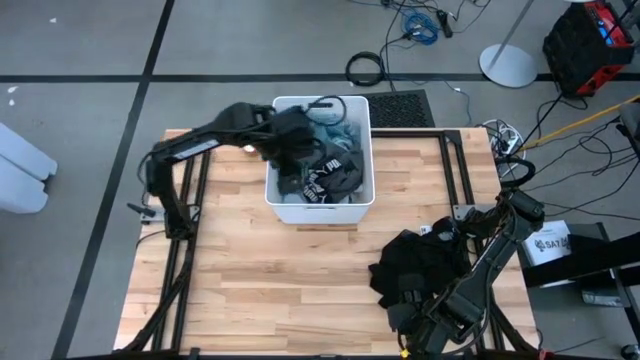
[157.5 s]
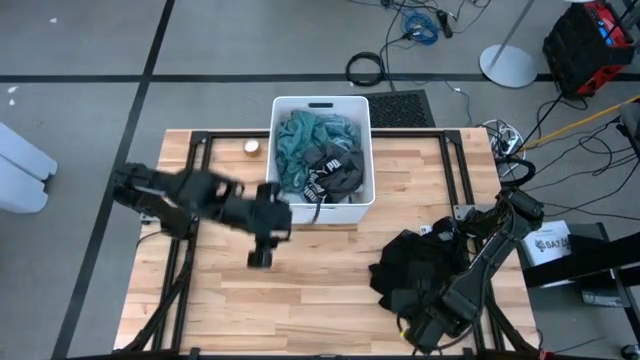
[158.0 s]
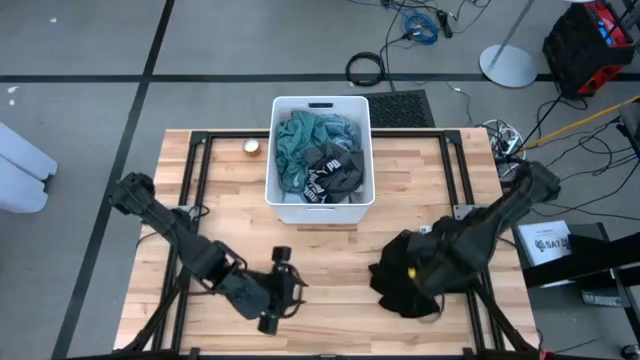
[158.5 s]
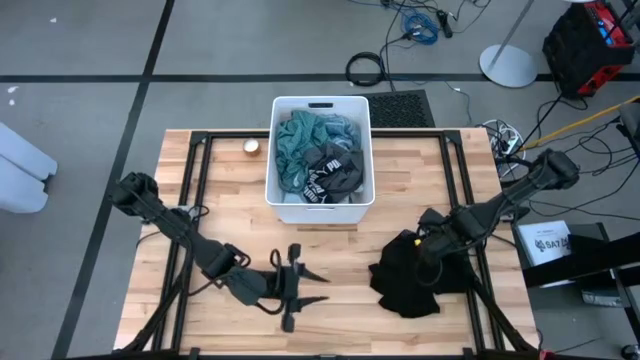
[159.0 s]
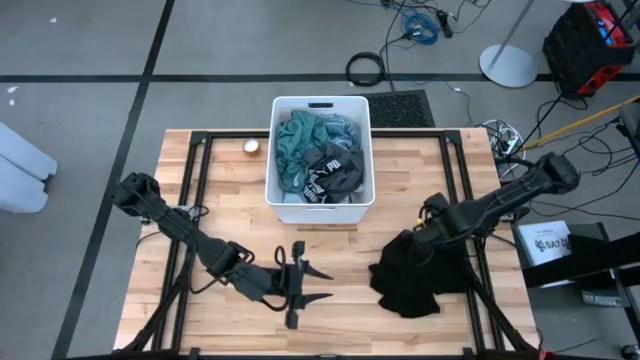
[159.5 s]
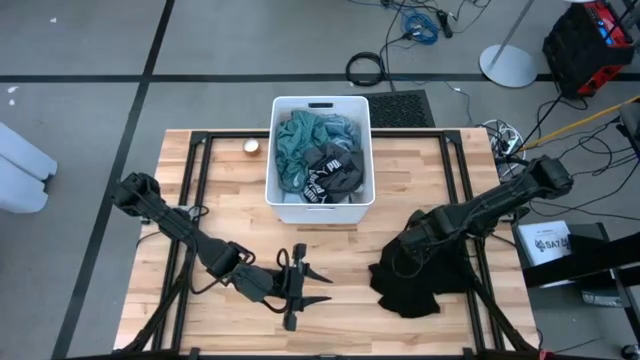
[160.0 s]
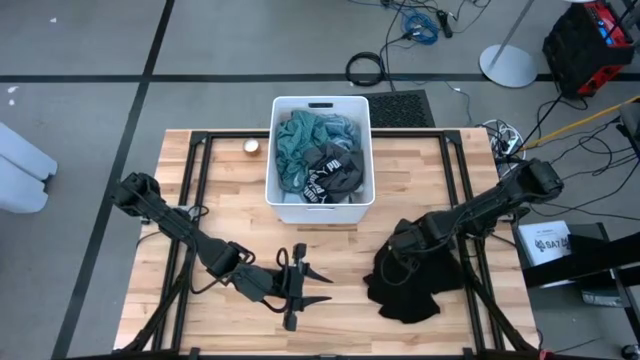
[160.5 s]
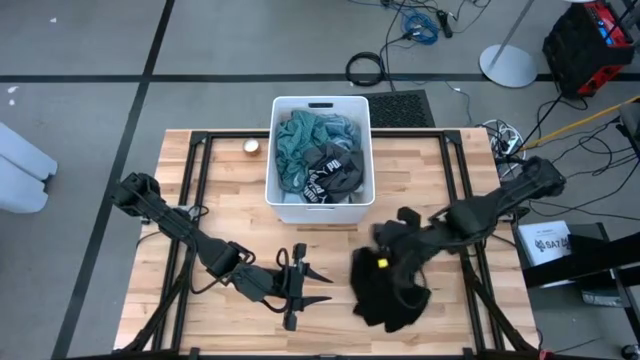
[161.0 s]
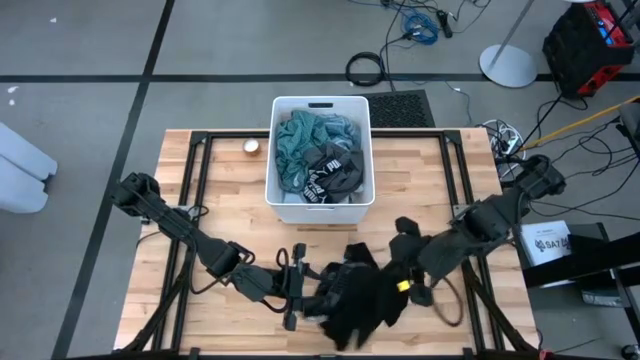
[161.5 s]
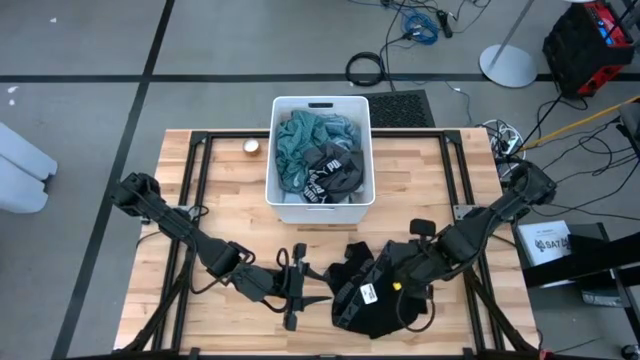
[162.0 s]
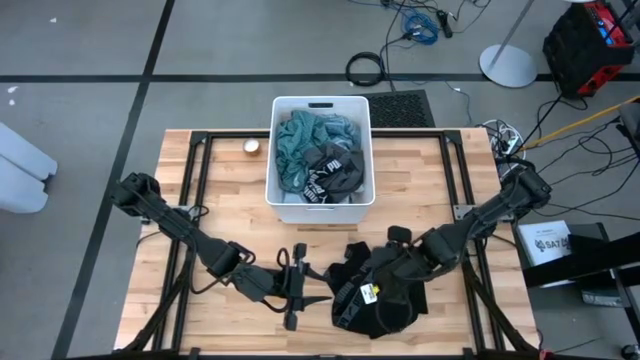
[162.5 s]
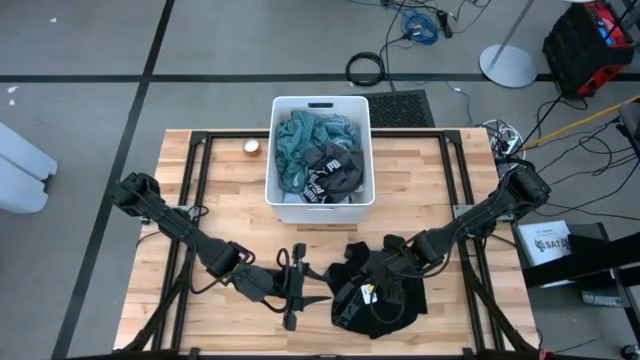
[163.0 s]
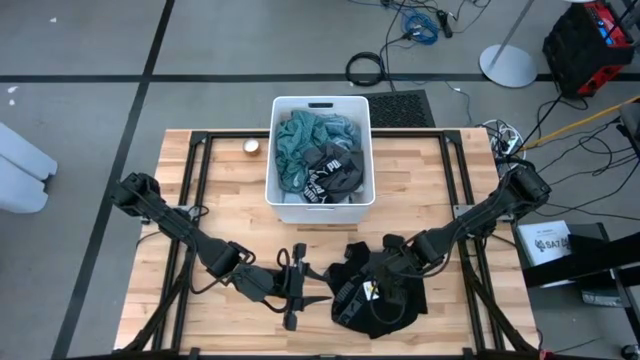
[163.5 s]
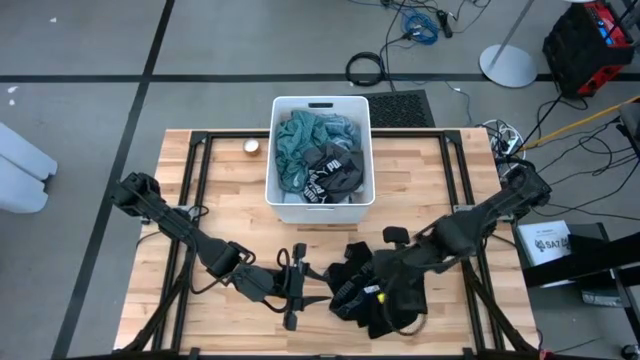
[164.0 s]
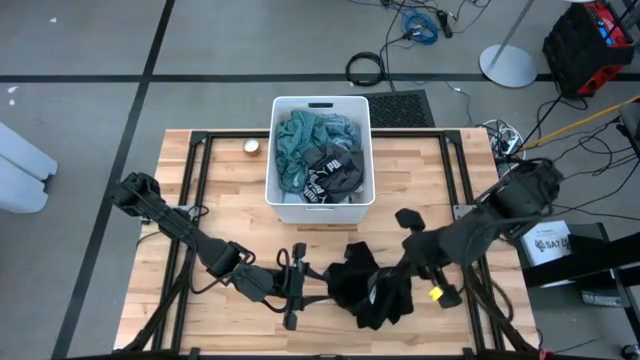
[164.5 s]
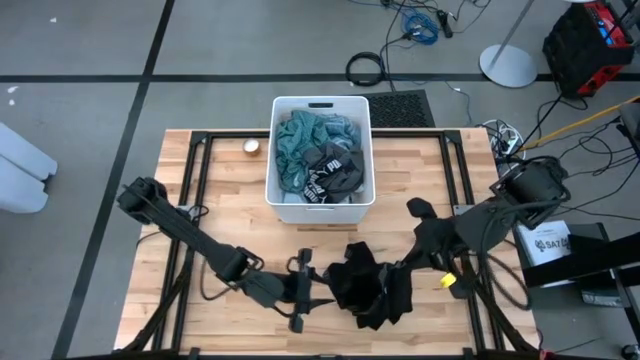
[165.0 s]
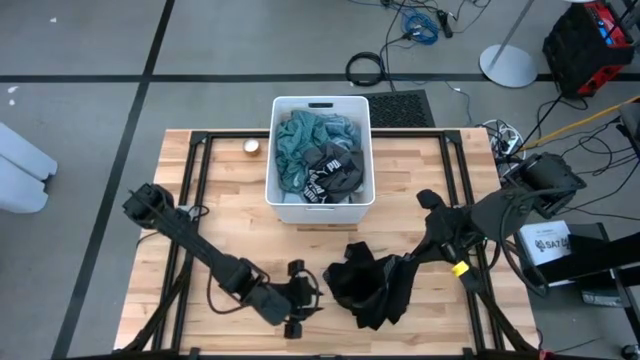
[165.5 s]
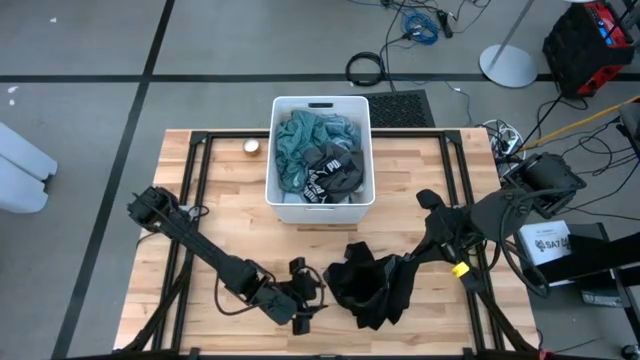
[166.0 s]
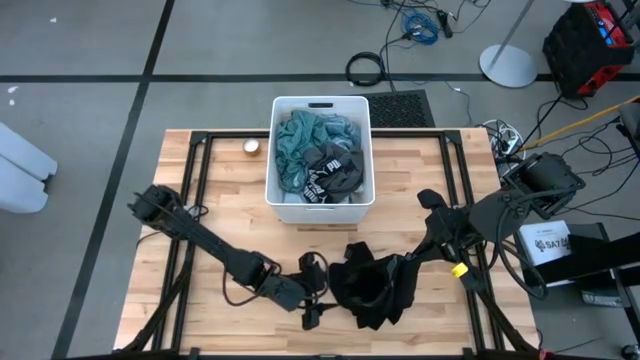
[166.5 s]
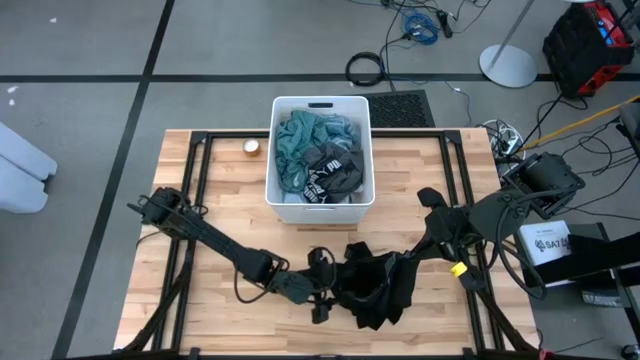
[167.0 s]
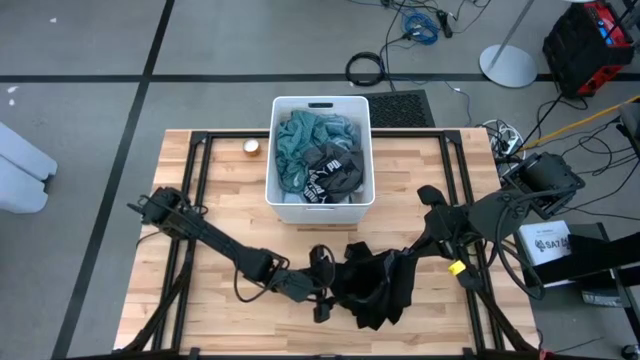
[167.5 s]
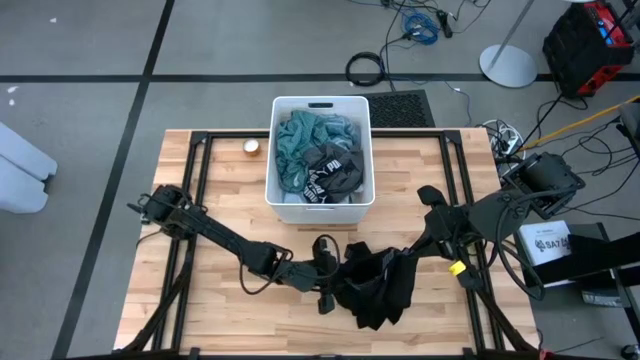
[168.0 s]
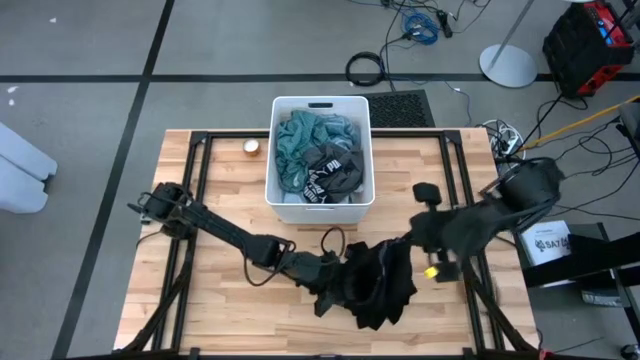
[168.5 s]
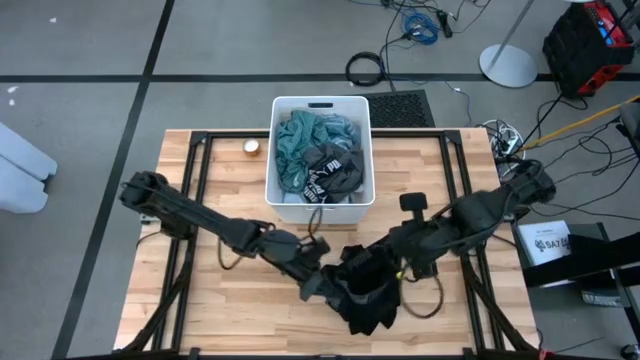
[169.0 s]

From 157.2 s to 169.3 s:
Task: Sort clothes
Put the black boxer into the white laundry bin

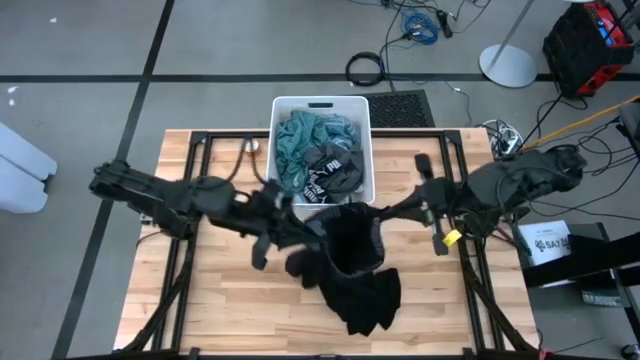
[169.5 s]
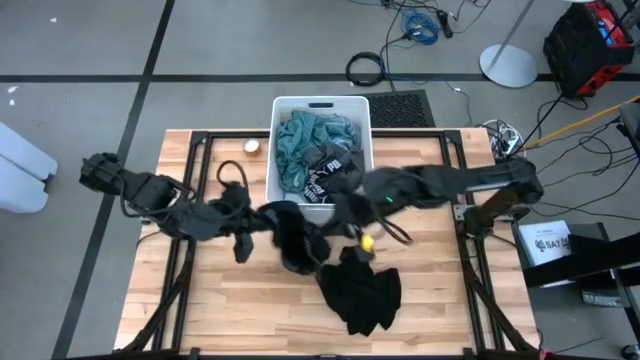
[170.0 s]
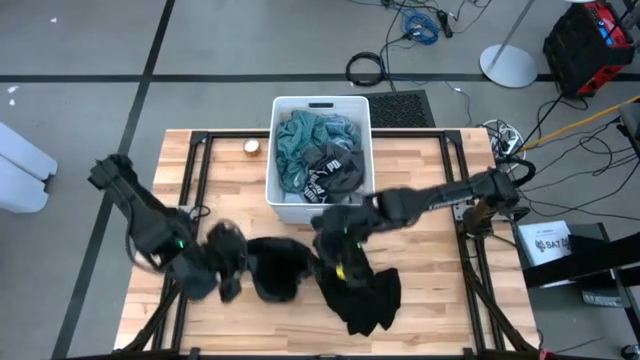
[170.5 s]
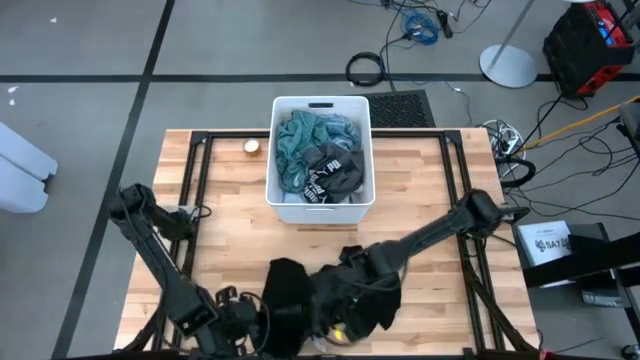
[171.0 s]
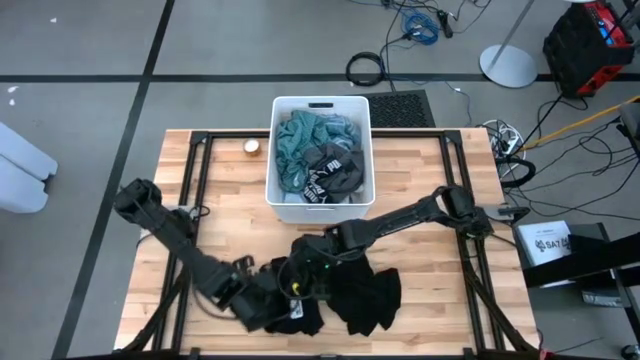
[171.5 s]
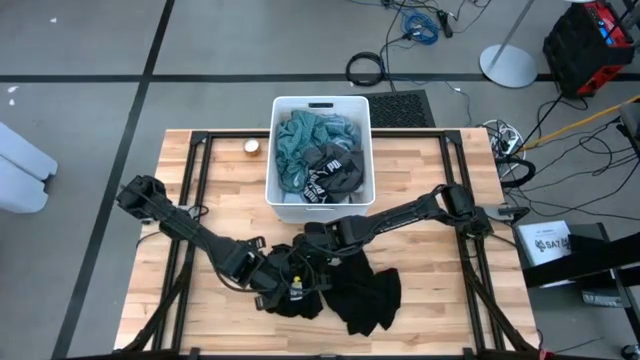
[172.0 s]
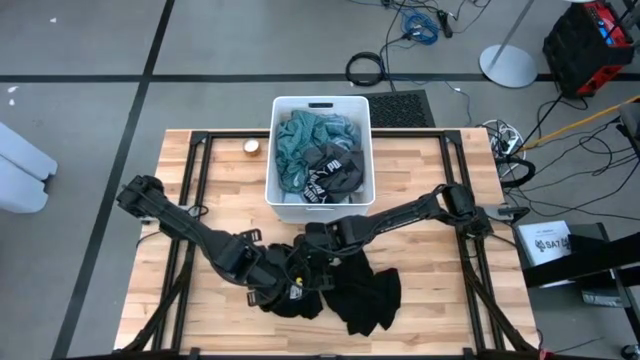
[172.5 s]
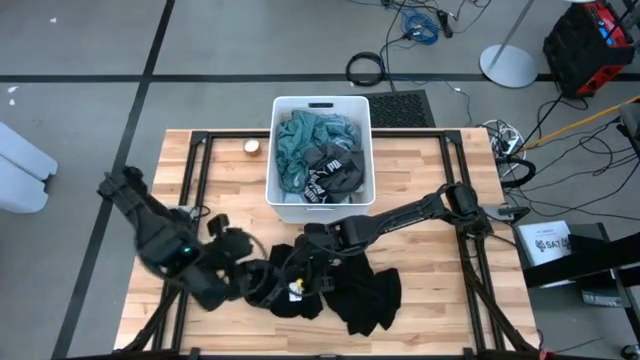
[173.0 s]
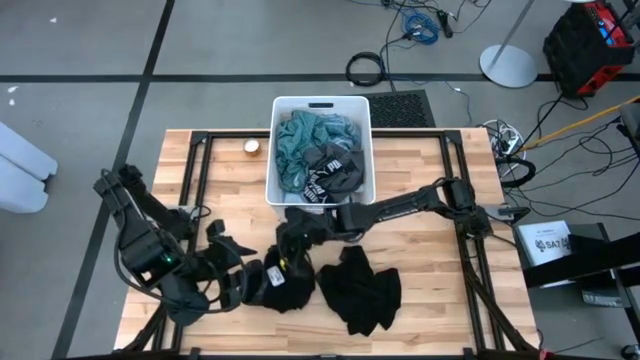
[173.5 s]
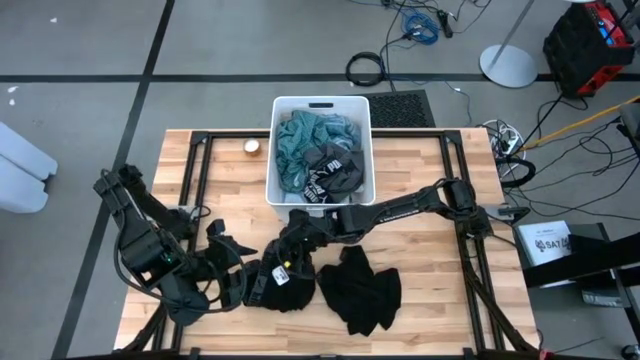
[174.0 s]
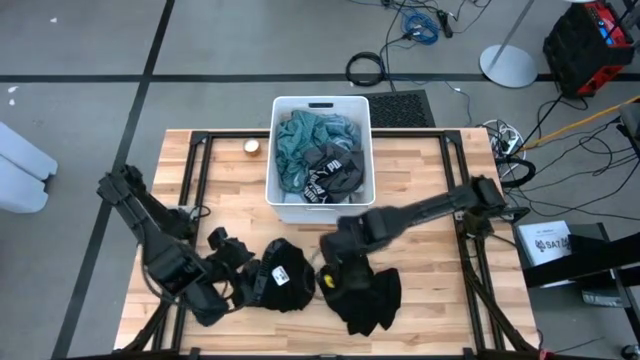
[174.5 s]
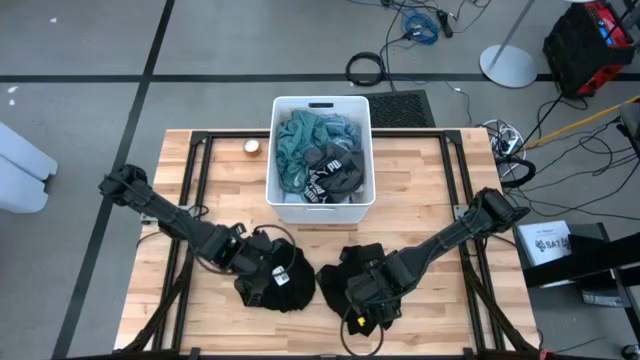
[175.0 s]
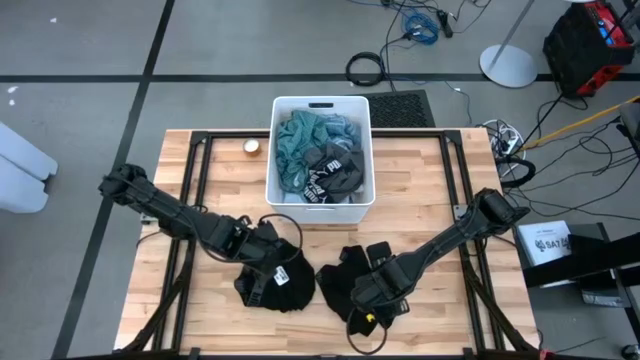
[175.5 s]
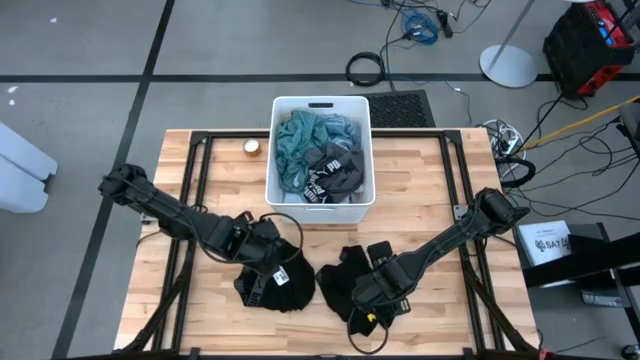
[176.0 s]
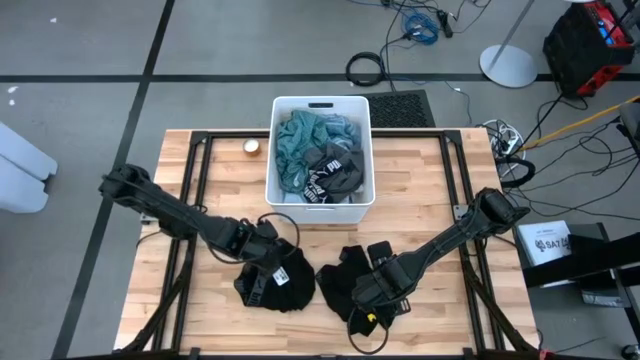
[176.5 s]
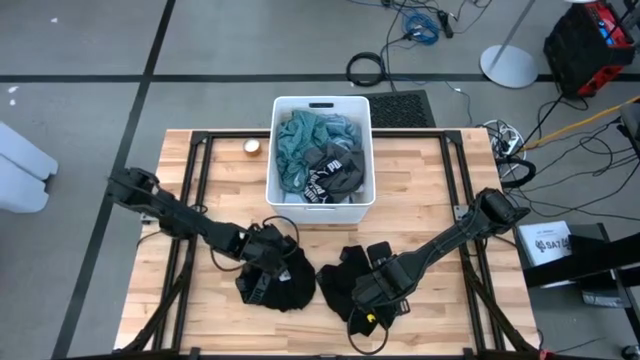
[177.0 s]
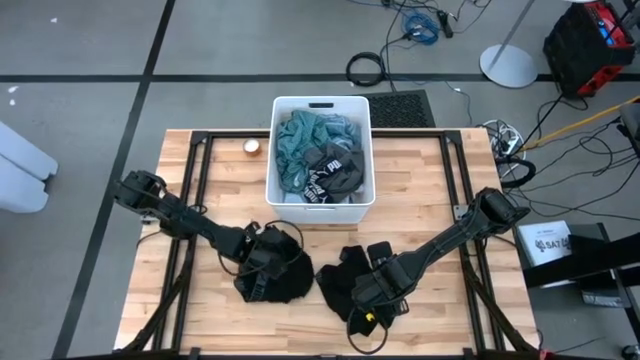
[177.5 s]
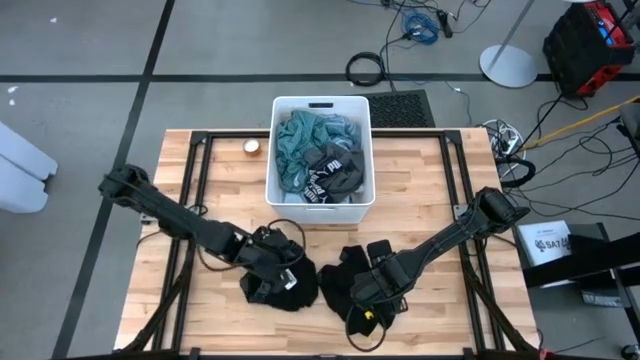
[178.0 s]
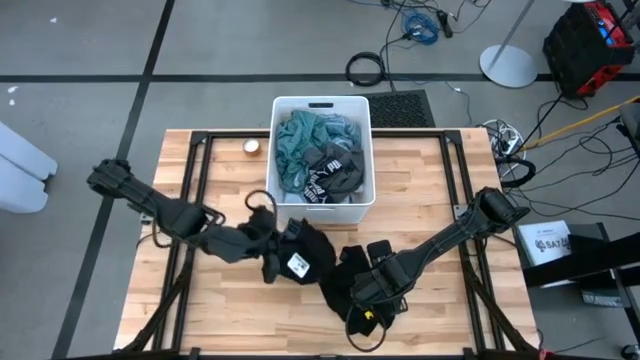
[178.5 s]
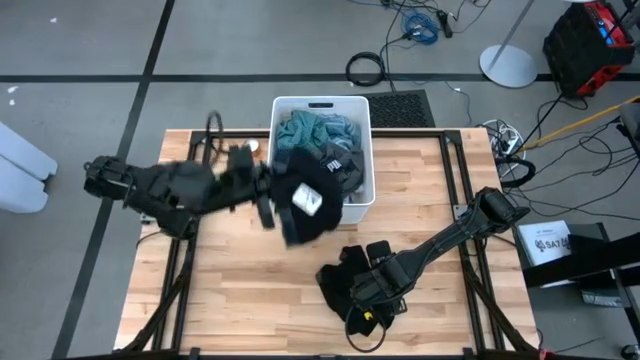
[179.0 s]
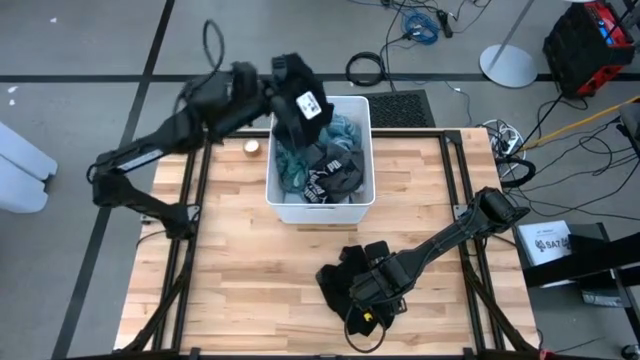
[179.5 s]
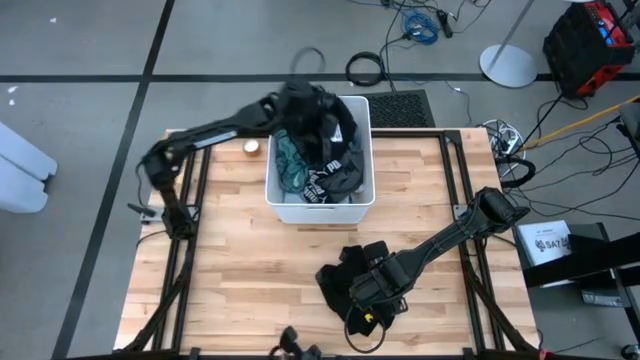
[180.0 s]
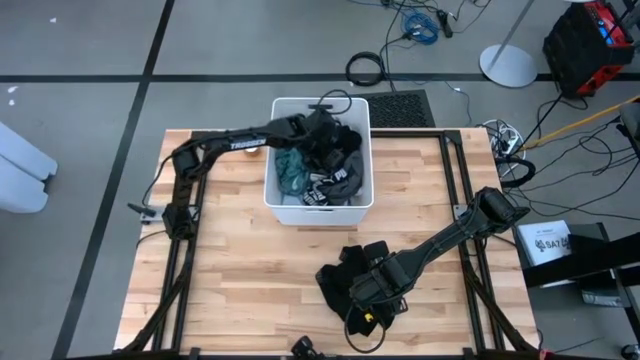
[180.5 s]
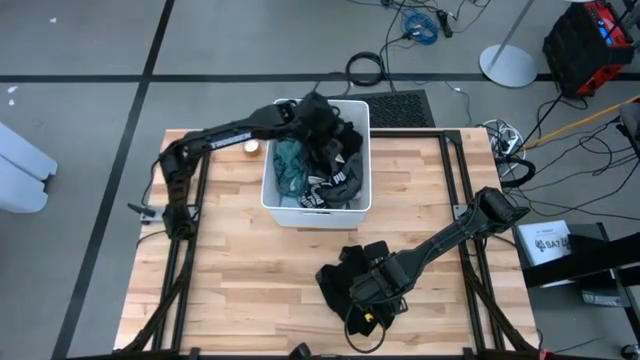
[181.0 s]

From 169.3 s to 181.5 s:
Put the black boxer into the white laundry bin
